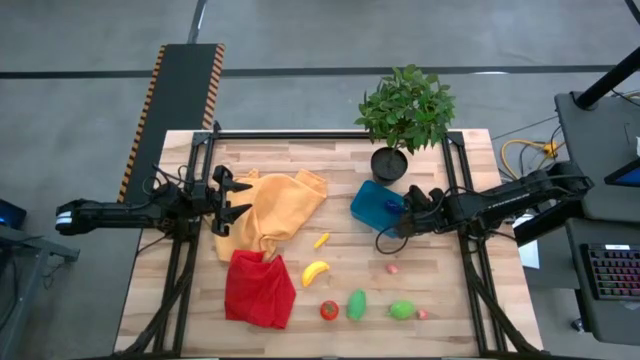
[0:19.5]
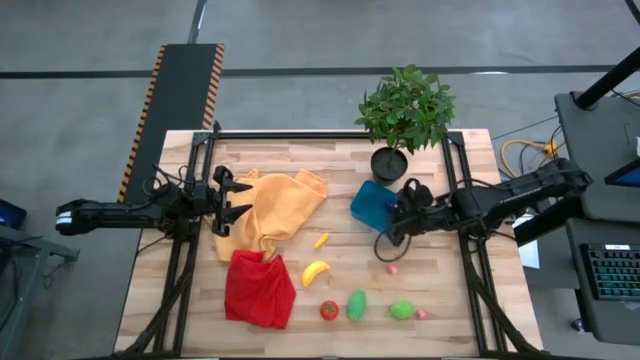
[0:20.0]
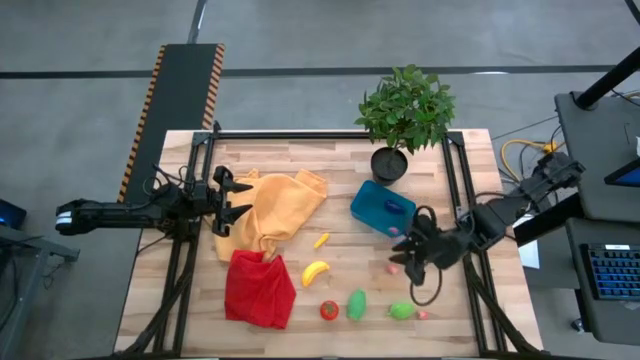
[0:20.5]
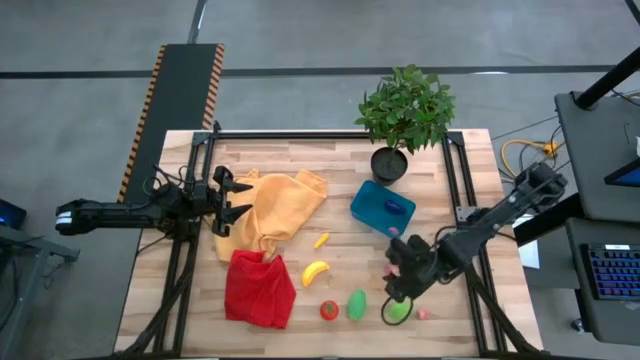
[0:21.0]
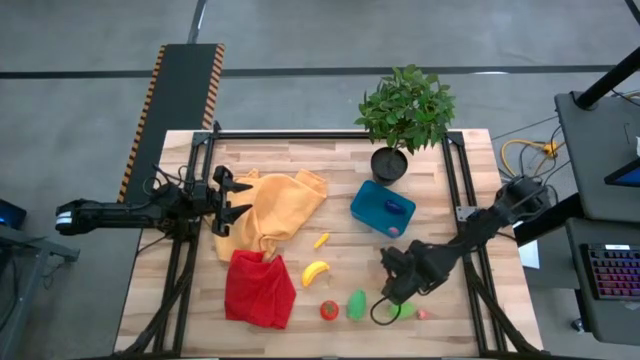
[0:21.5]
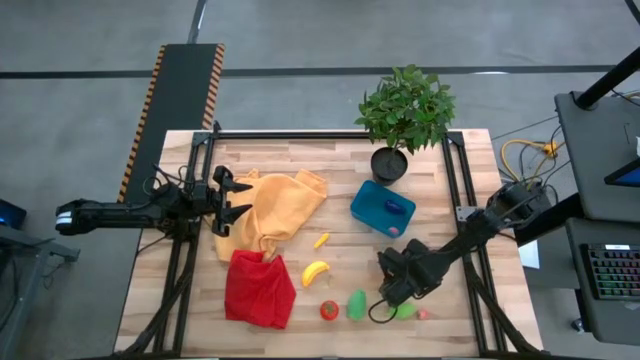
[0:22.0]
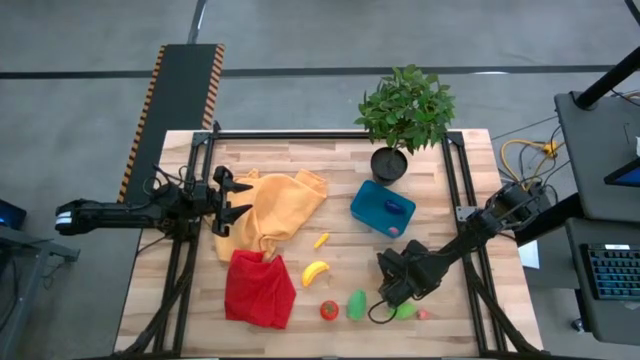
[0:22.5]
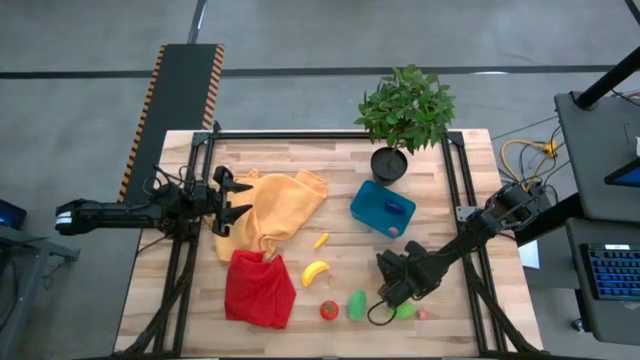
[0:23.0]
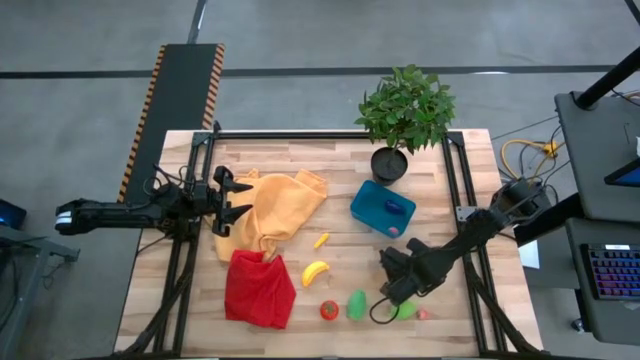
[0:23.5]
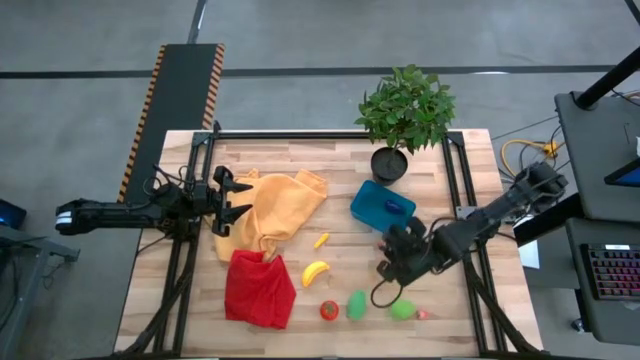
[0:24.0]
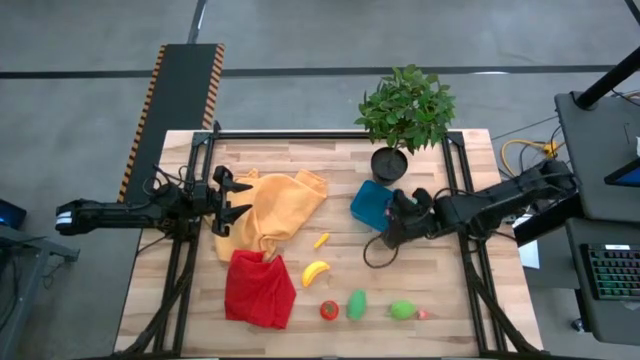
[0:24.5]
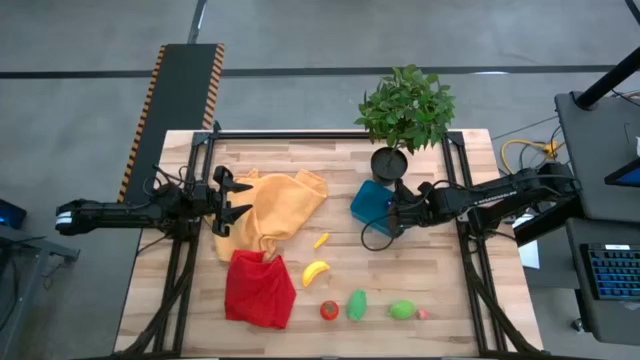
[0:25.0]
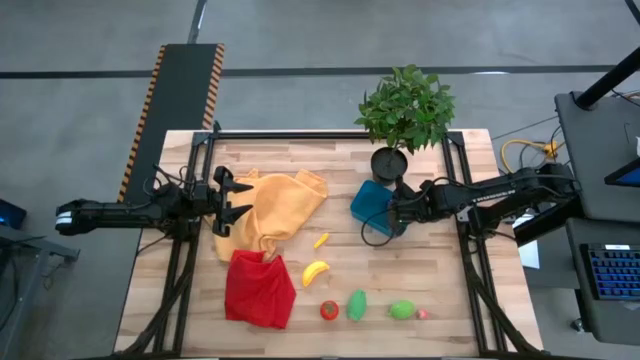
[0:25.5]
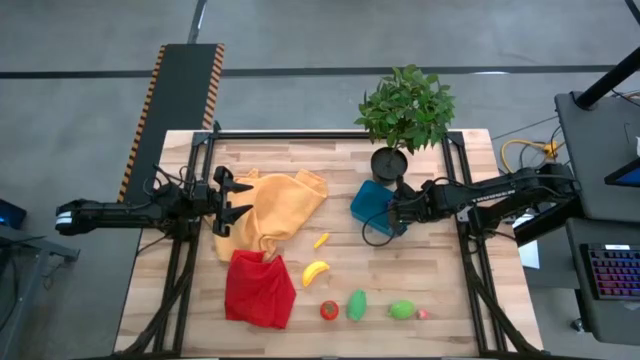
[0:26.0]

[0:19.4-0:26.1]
Task: Pick and placing Produce into tupperware
Put the top peach into the blue bin

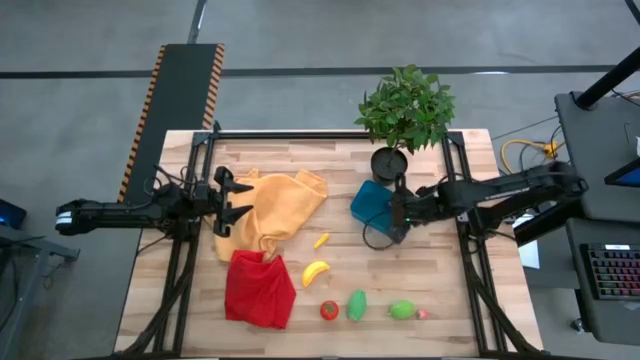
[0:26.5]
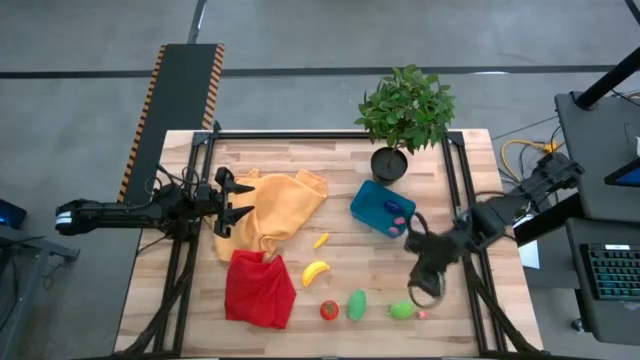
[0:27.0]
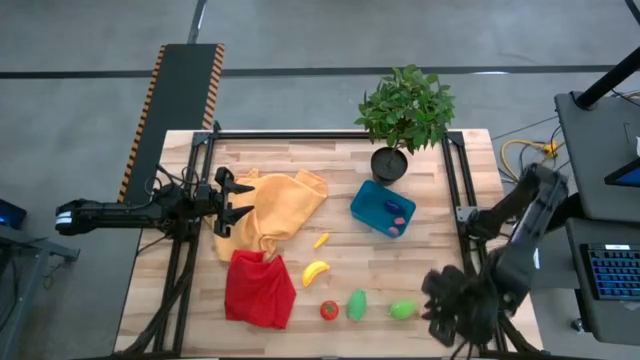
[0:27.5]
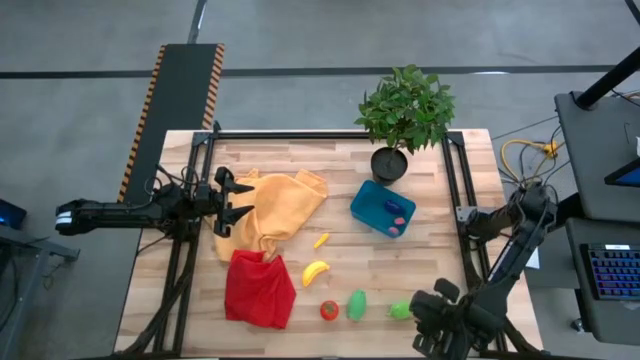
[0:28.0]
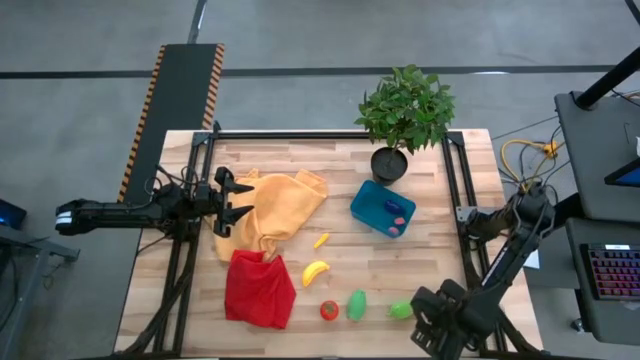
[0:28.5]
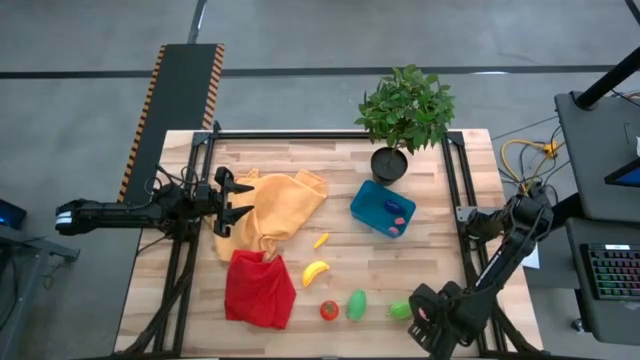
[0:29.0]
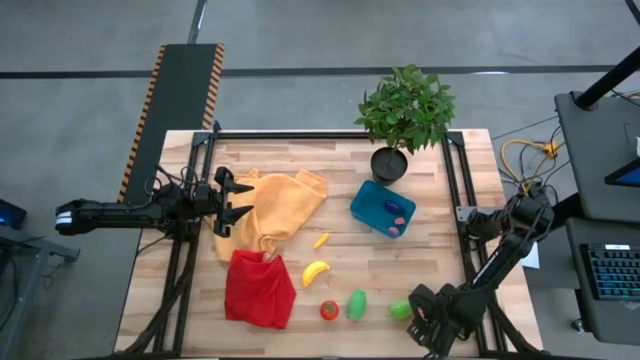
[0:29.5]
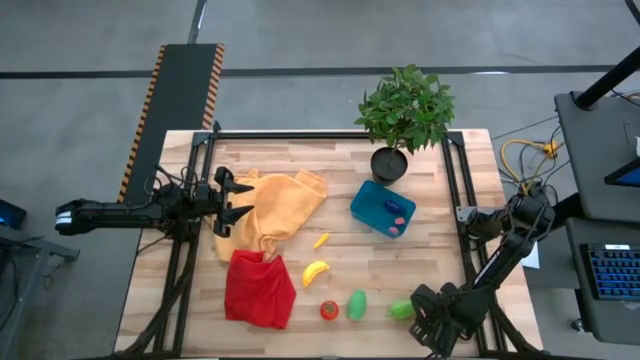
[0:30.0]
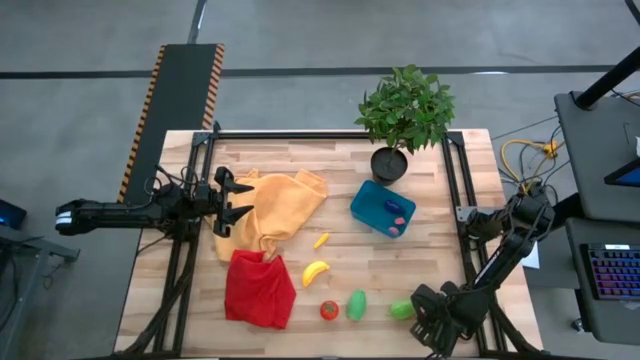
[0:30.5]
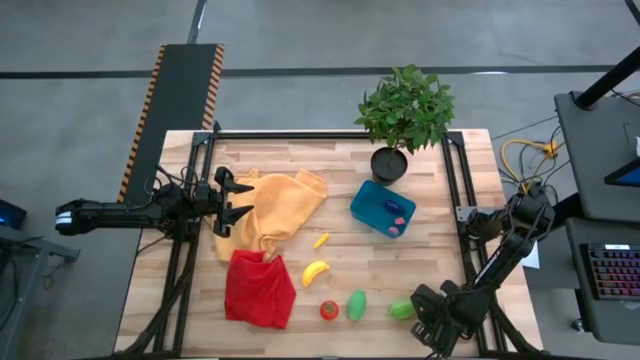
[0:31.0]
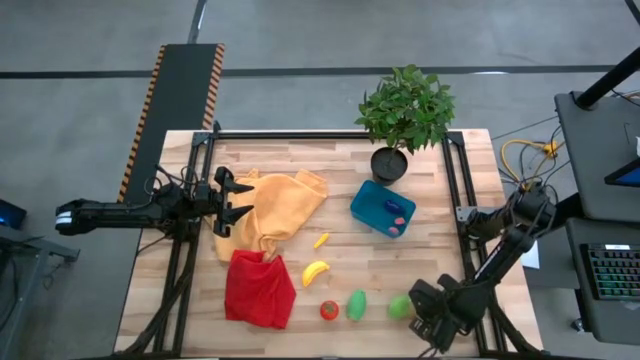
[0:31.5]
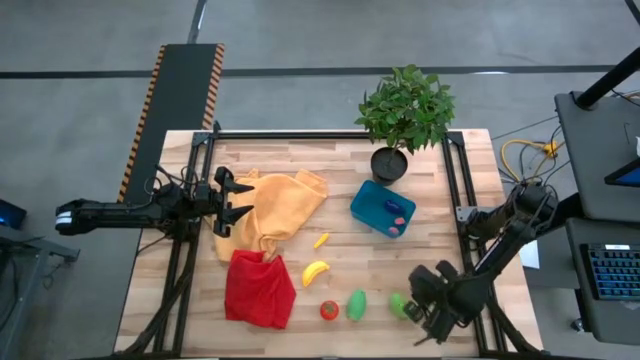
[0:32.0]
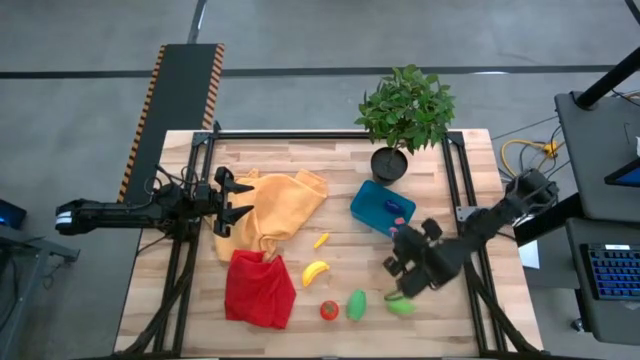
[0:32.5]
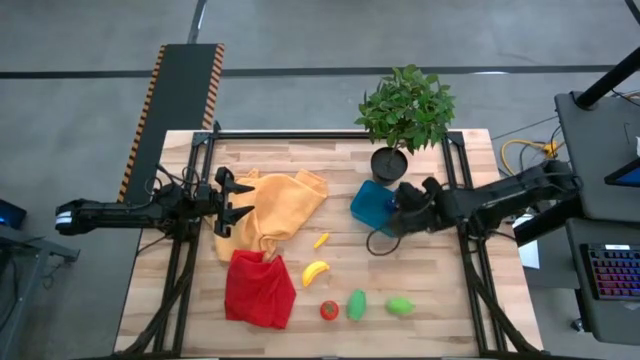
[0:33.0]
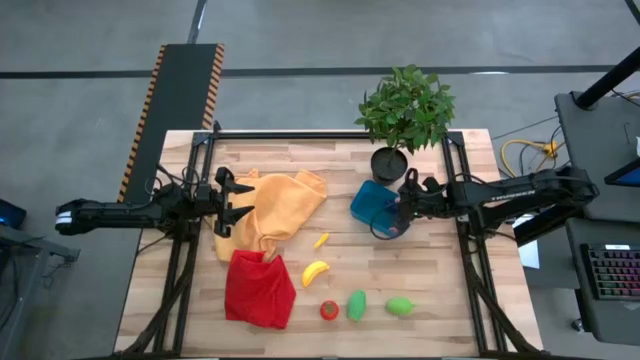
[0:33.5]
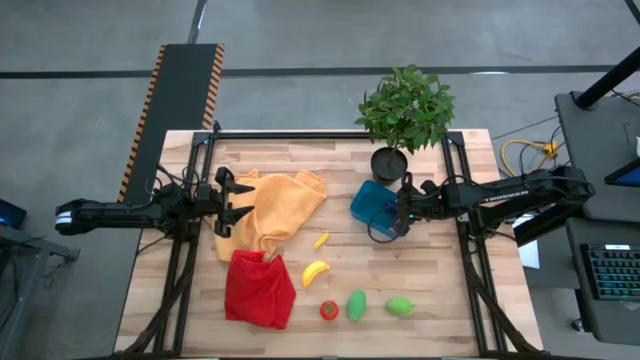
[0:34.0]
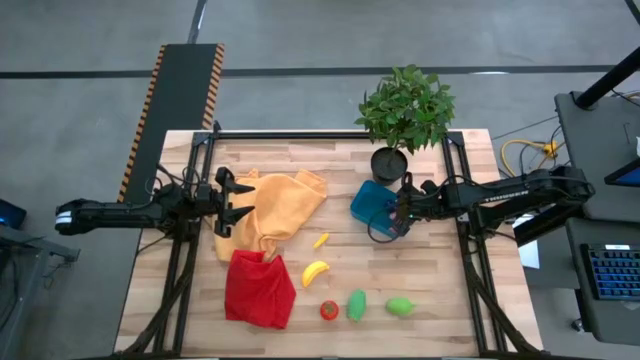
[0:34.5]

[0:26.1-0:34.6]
Put the peach into the blue bin

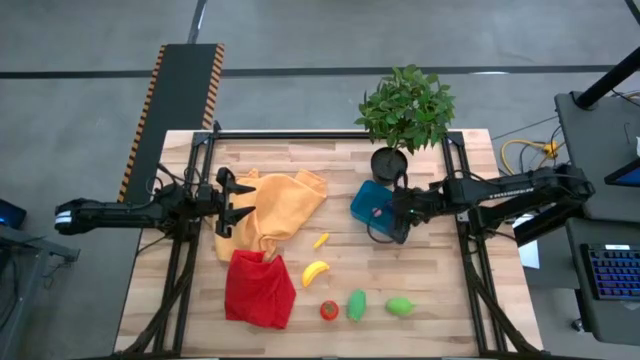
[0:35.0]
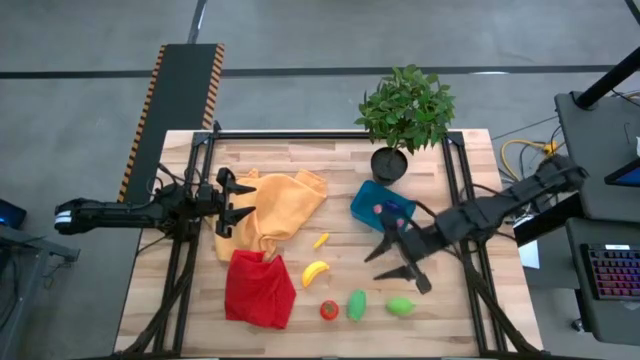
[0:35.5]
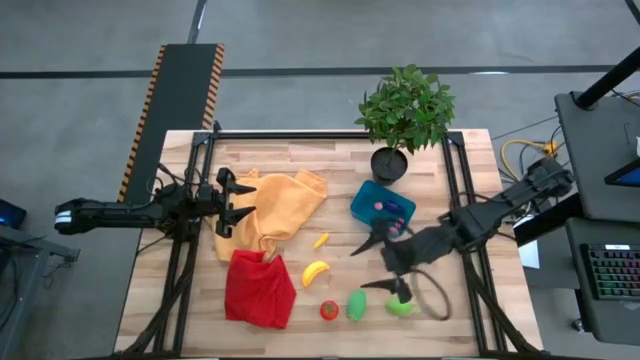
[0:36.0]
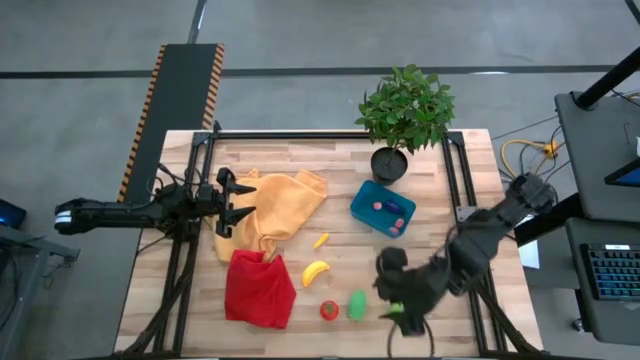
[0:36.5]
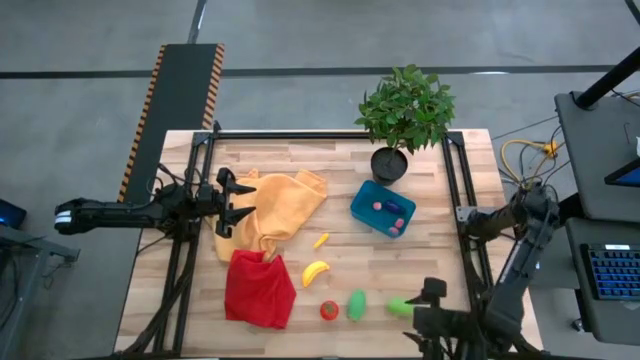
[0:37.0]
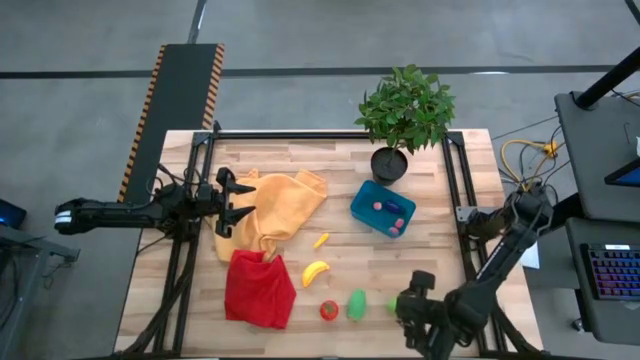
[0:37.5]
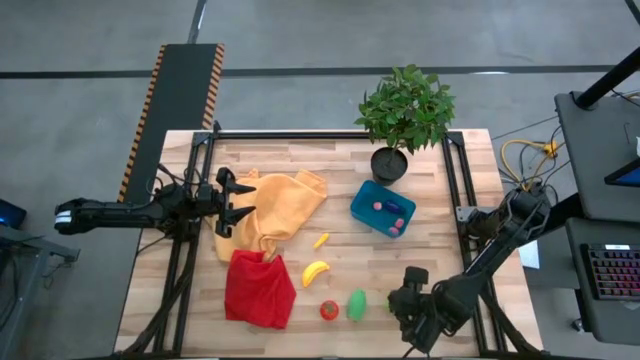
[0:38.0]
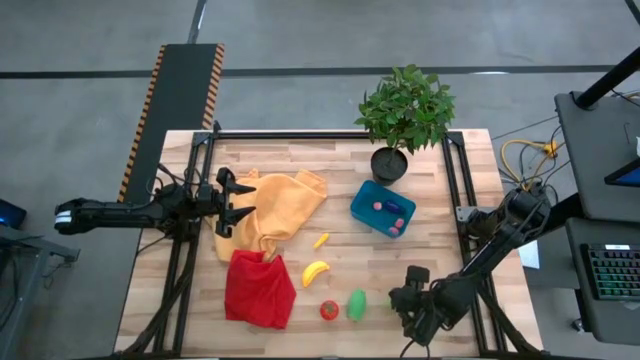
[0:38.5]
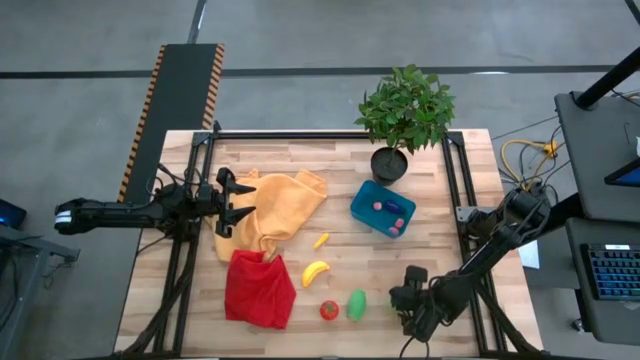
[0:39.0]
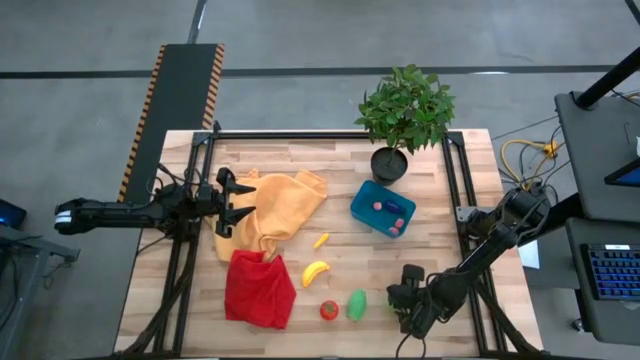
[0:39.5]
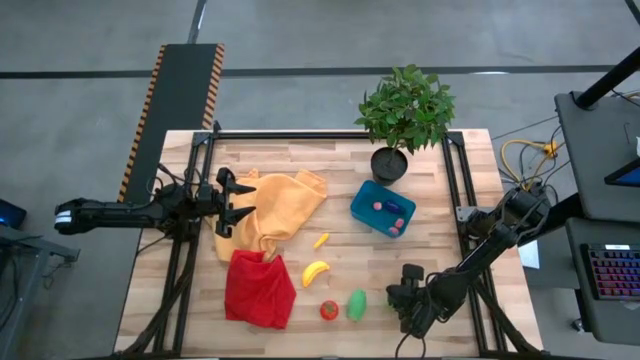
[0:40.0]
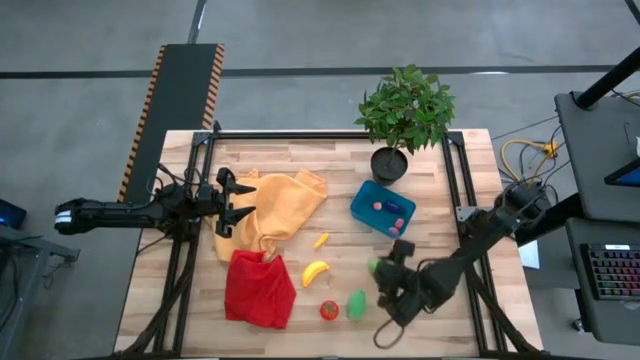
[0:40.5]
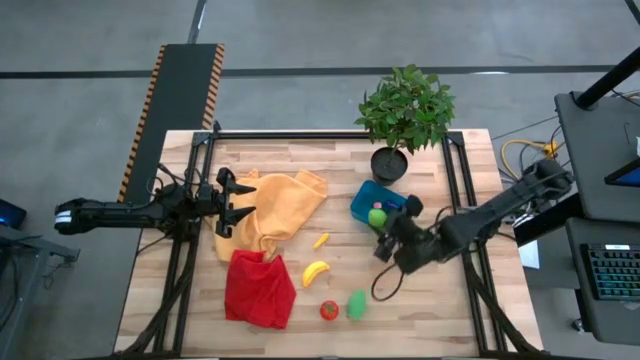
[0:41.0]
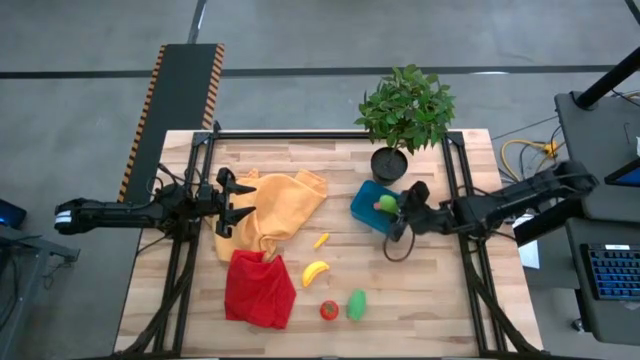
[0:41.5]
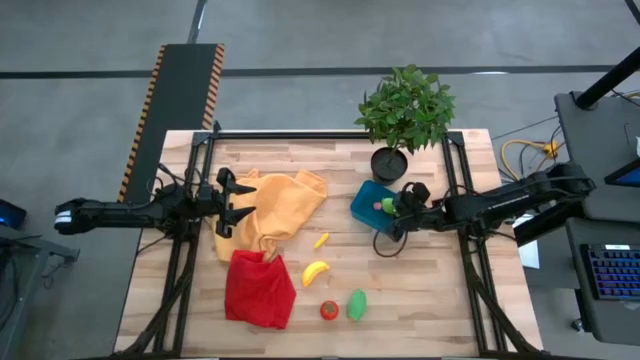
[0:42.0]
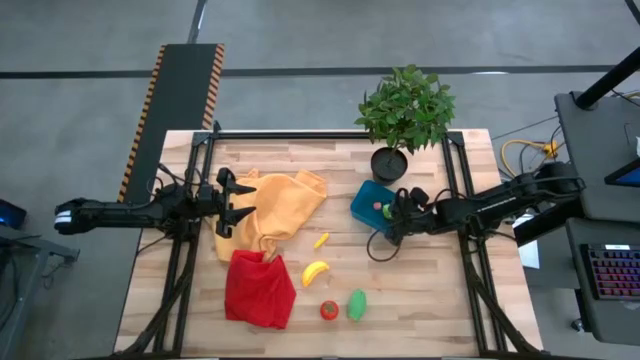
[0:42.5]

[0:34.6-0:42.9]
Put the melon into the blue bin
